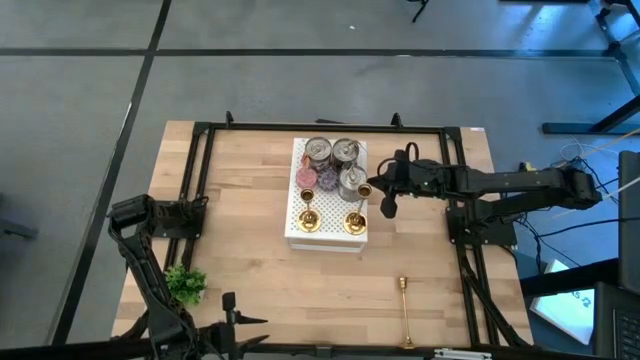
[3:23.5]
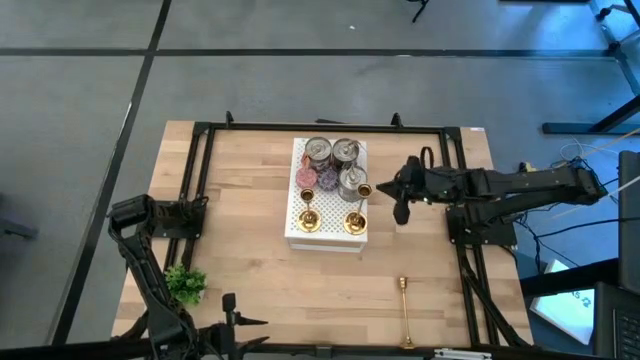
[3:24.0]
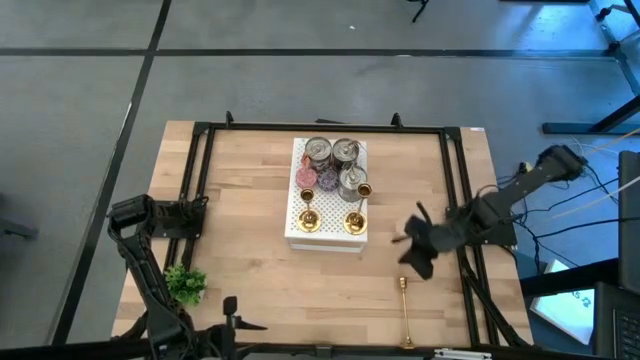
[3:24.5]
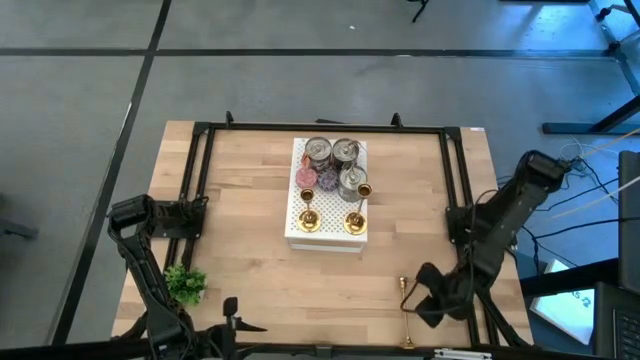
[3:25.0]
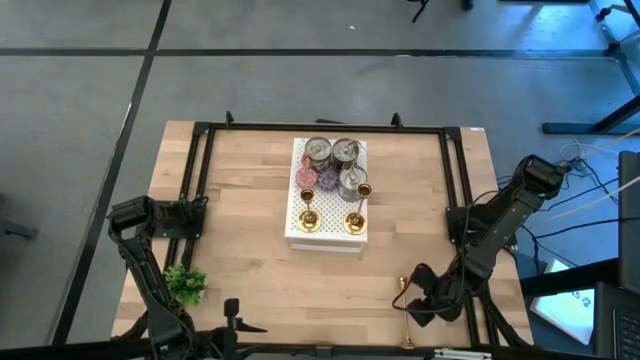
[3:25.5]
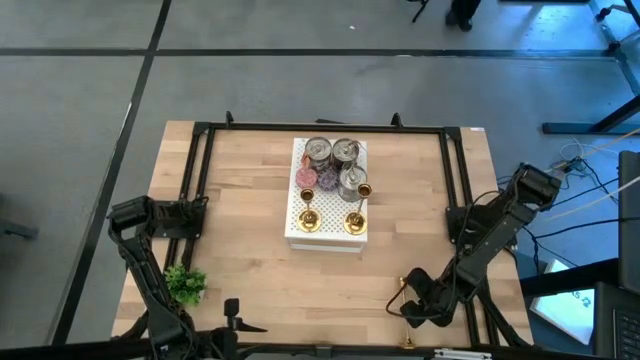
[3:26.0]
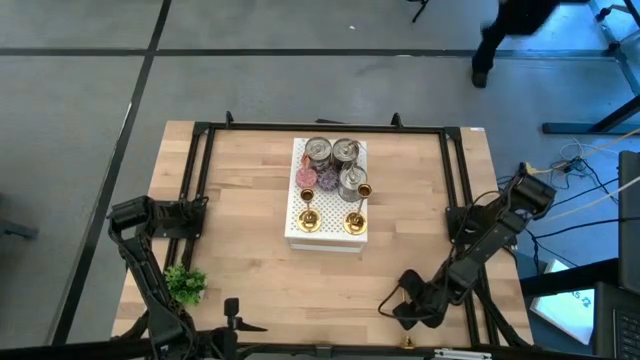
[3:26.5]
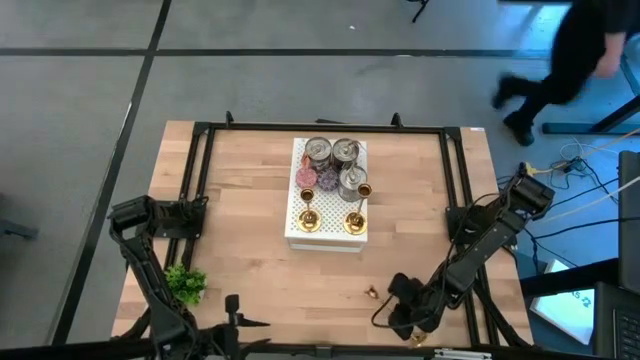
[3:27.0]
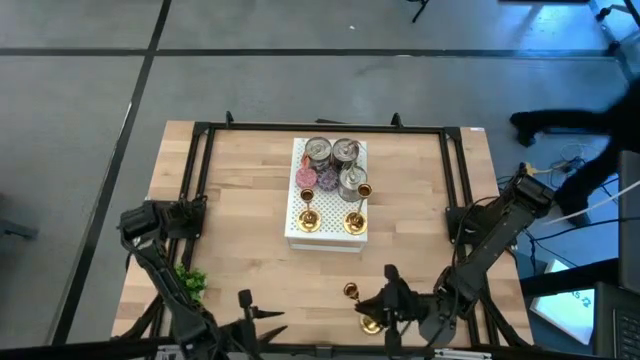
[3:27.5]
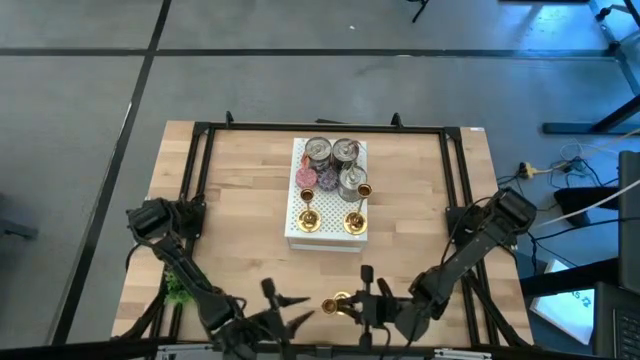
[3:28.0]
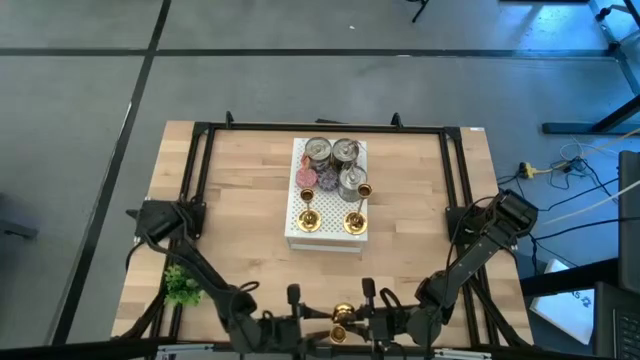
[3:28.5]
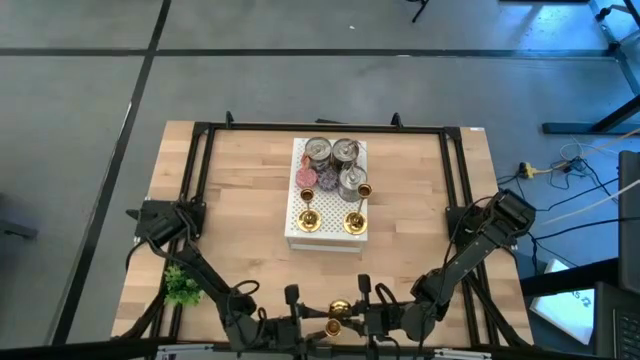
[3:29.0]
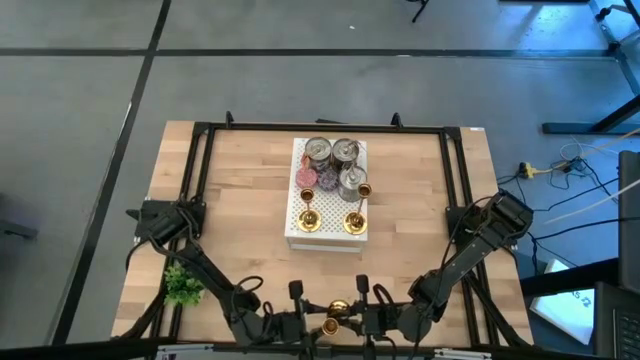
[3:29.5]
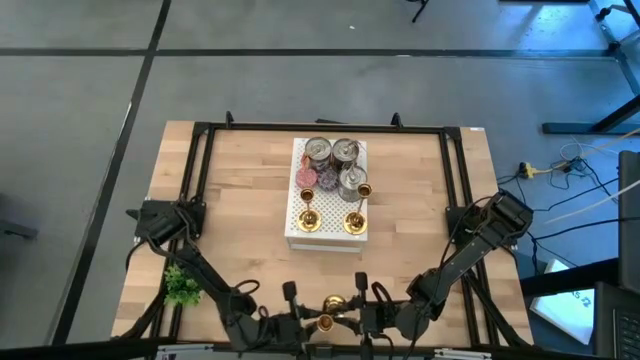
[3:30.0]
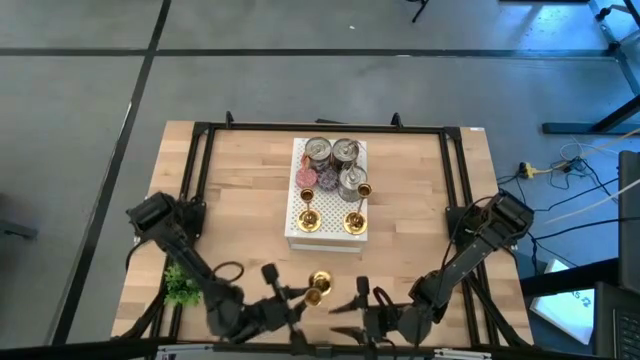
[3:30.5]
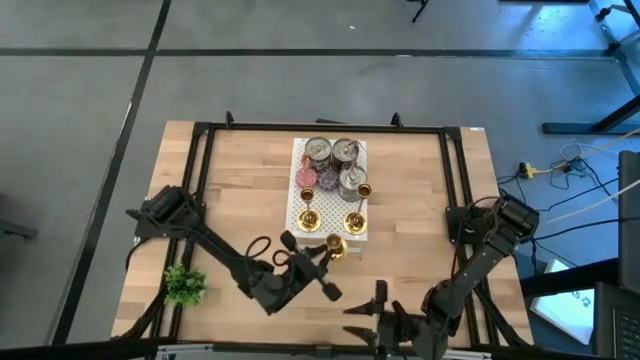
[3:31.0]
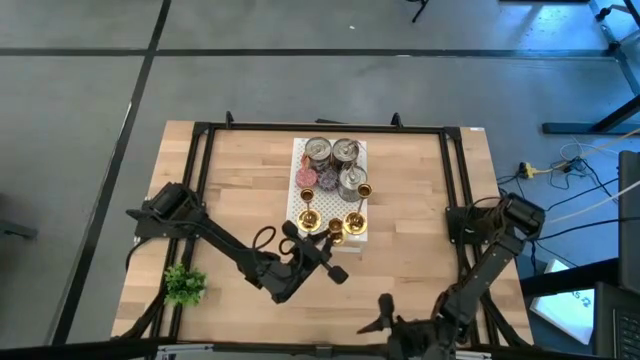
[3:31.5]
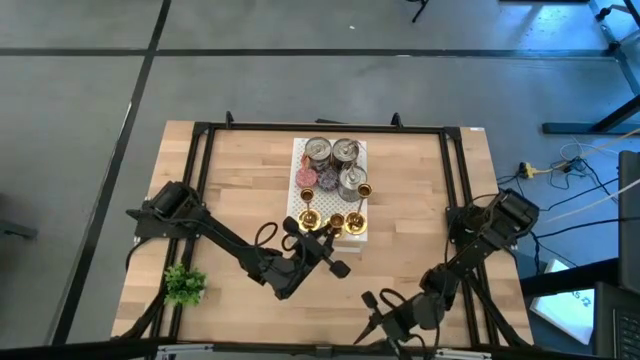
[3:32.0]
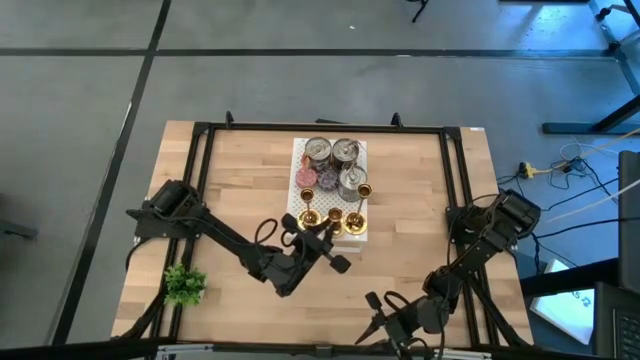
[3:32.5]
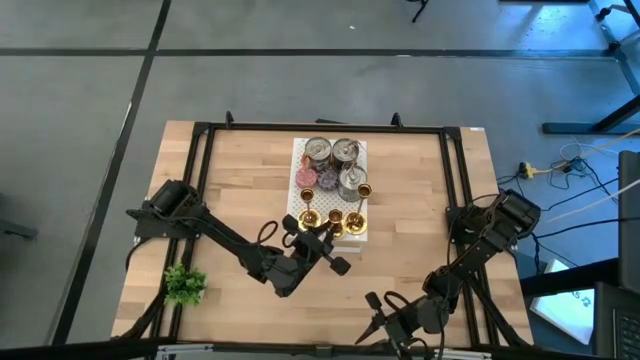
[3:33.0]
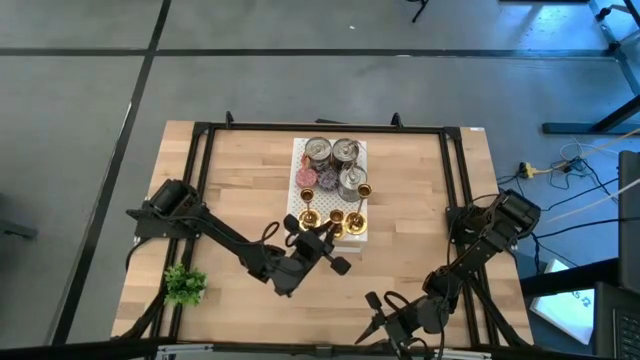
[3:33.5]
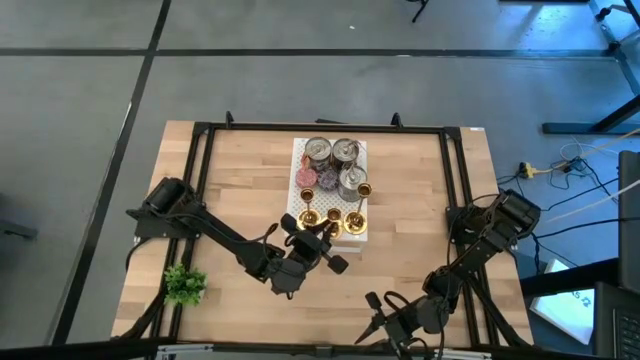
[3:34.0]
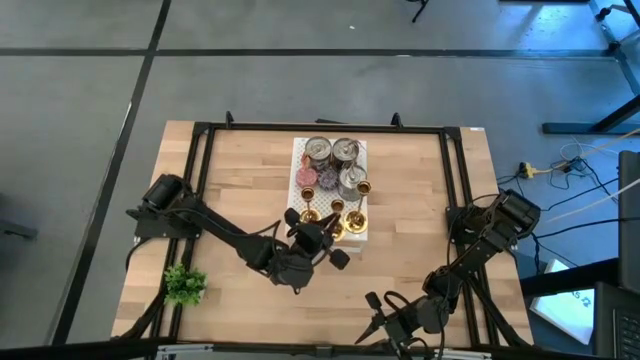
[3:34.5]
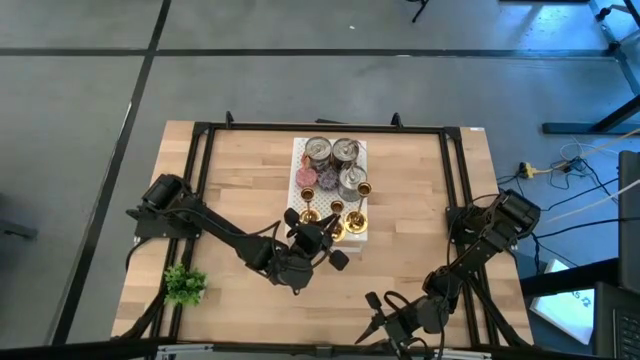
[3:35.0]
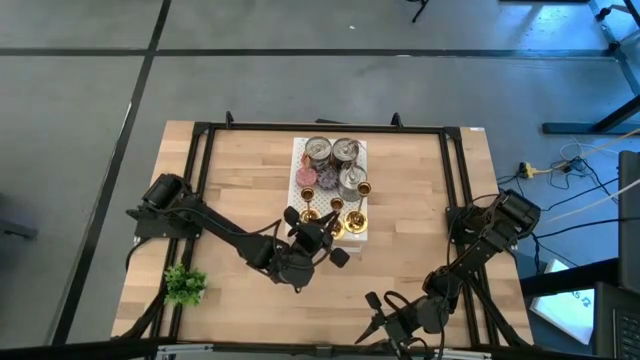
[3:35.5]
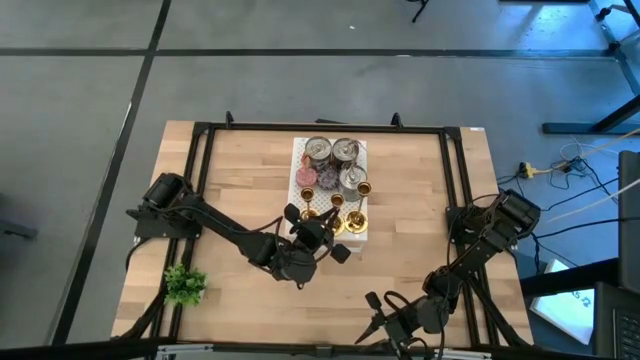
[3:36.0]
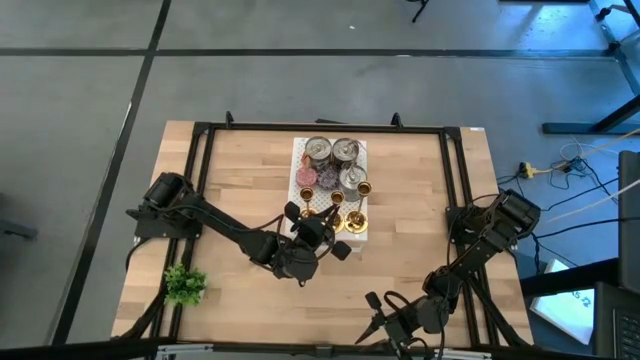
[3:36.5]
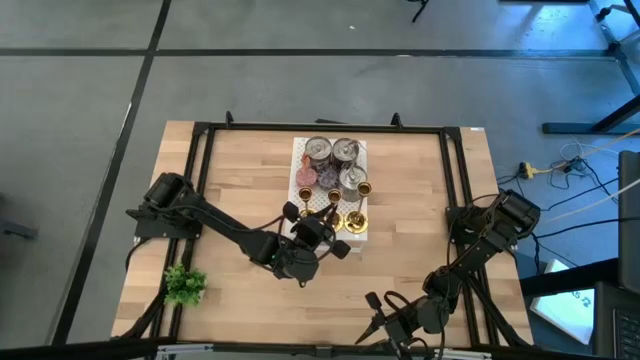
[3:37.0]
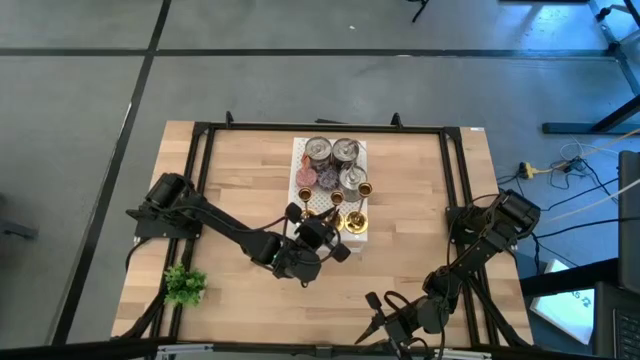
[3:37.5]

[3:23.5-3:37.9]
Task: Pick & Place candle stick holders
Put the gold candle holder on the shelf

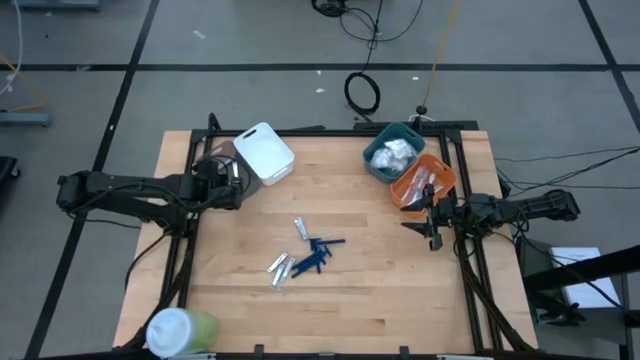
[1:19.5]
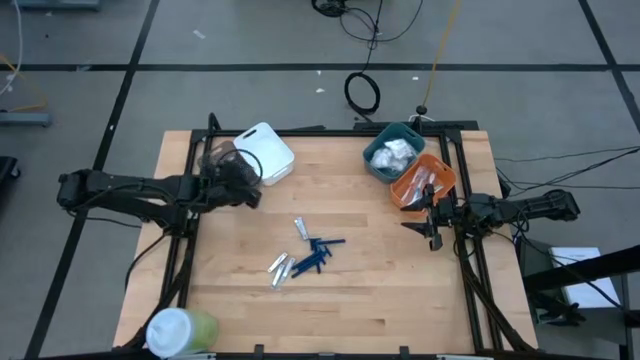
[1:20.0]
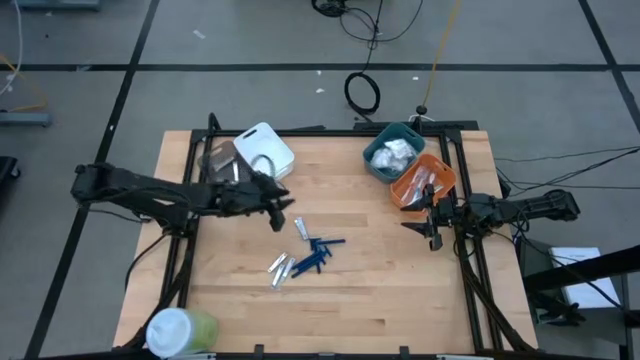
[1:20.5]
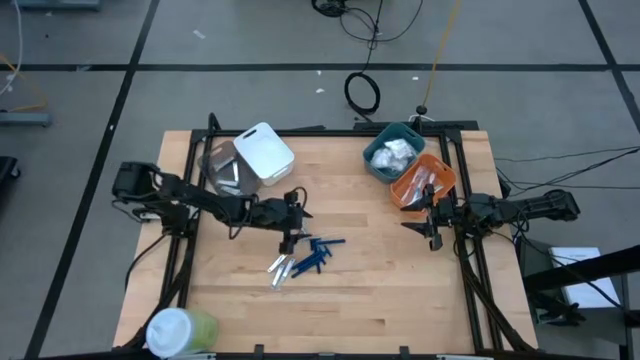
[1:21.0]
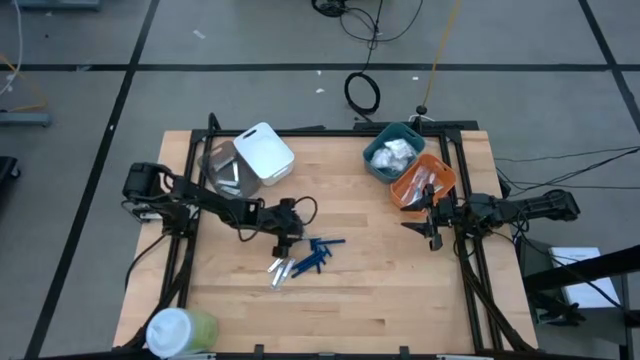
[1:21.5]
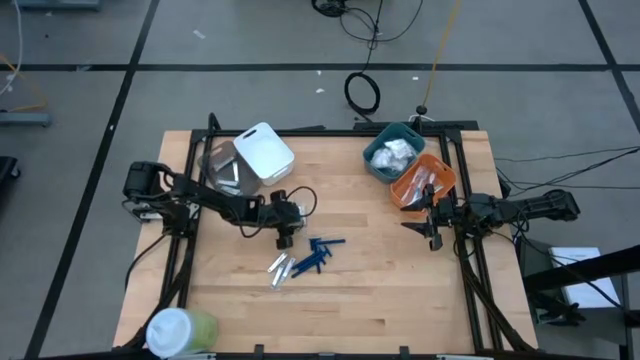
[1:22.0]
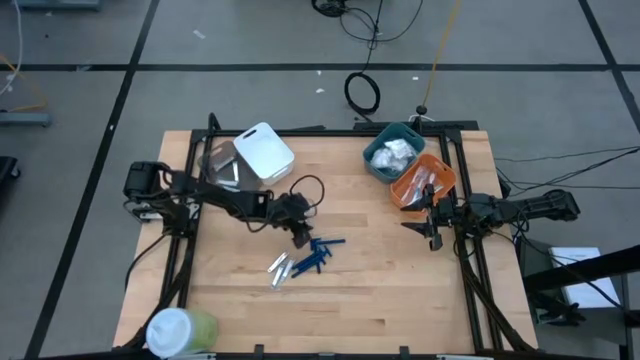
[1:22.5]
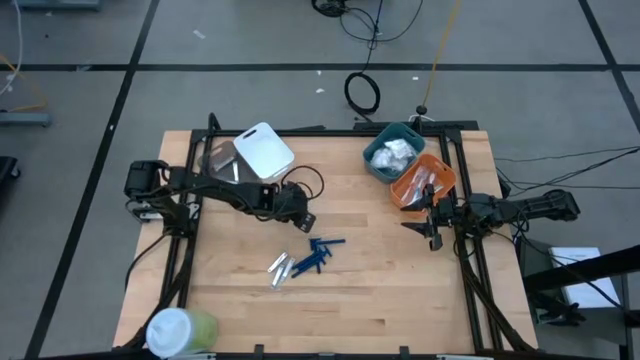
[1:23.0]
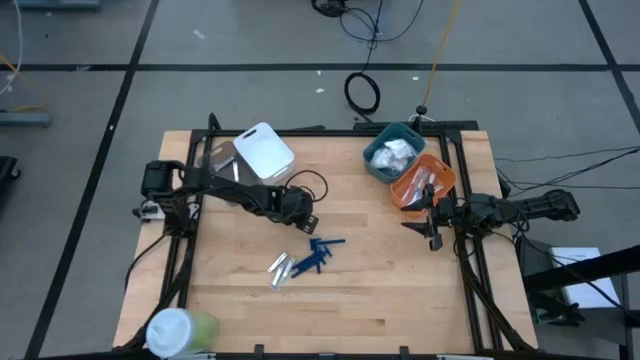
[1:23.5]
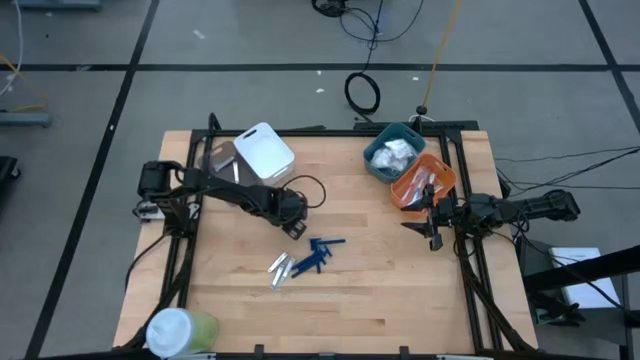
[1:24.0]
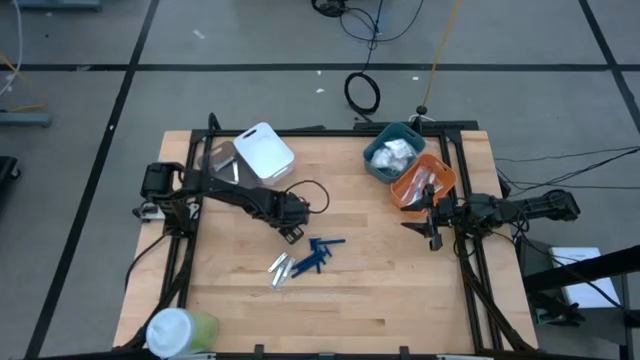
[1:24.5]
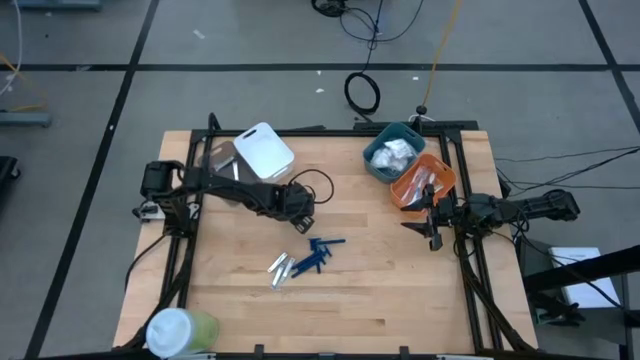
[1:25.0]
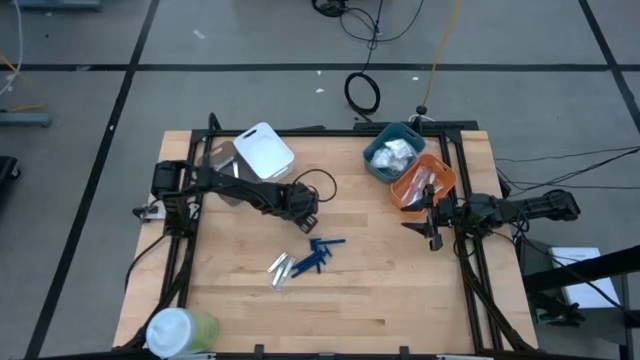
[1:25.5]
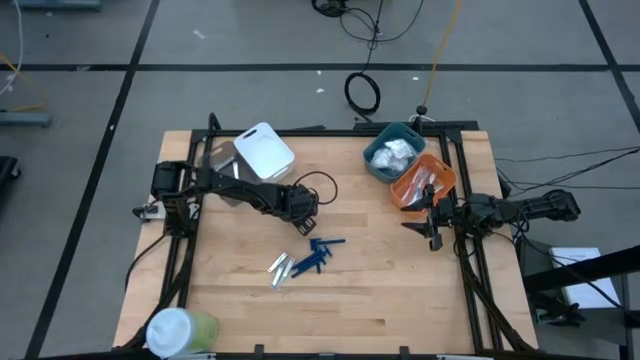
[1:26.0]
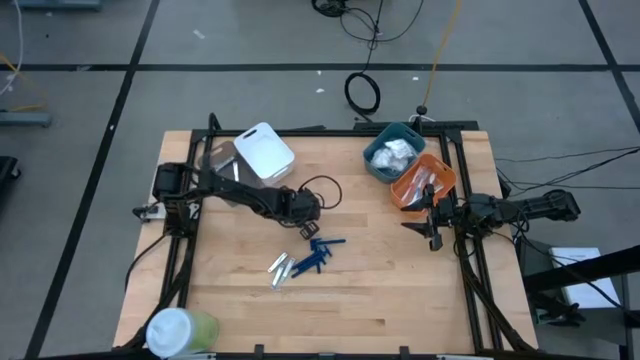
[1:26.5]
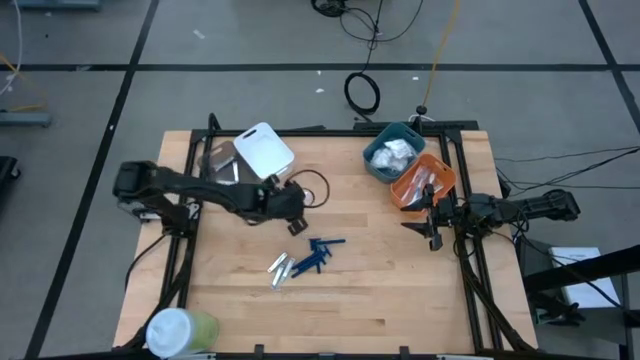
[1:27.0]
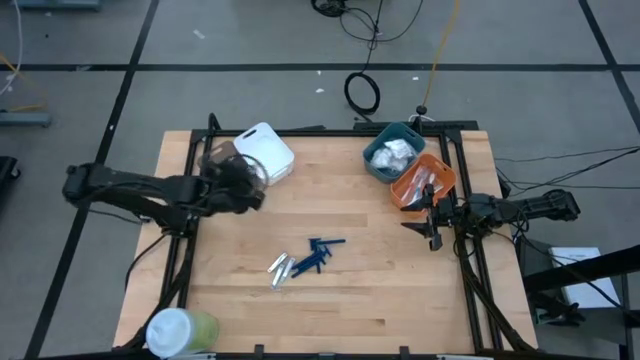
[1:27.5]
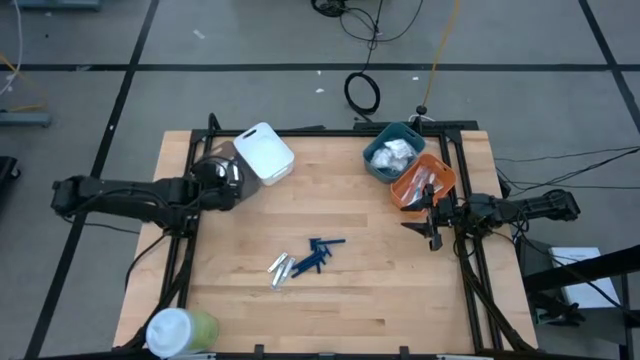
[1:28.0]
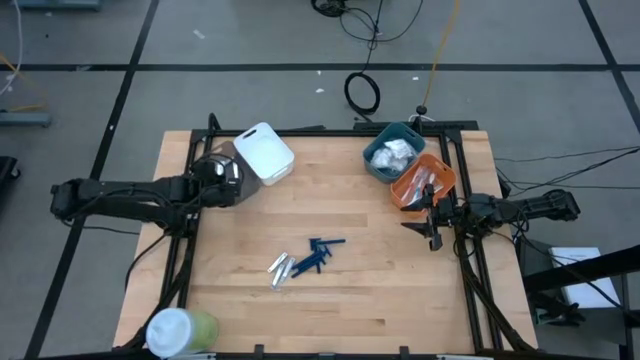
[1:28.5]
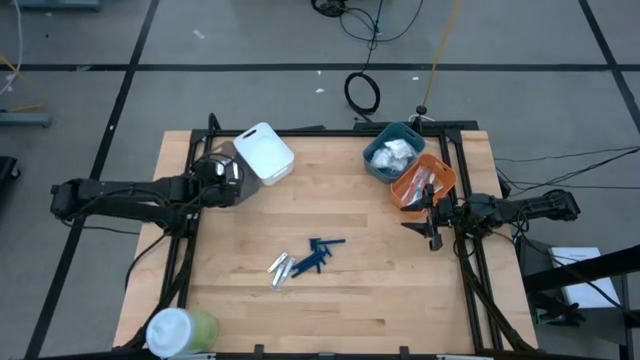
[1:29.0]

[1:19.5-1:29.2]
Task: Pick & Place Travel size toiletries
Put the silver nail cutter into the black bin
